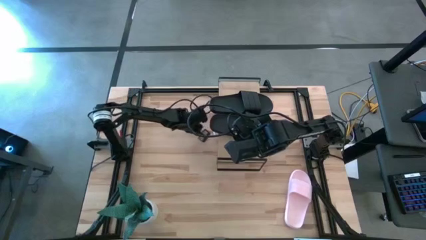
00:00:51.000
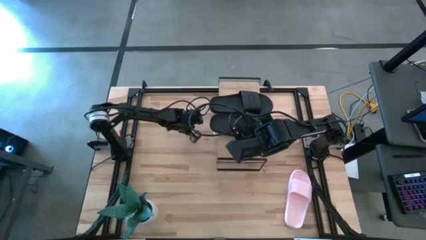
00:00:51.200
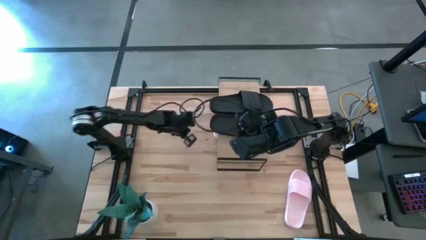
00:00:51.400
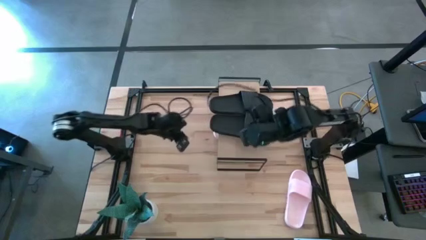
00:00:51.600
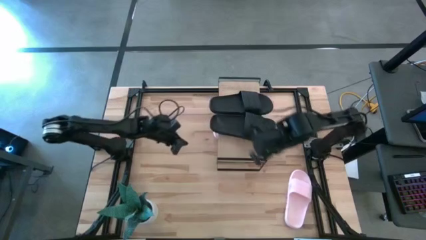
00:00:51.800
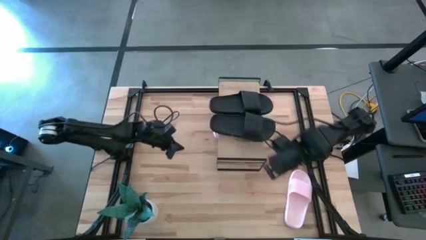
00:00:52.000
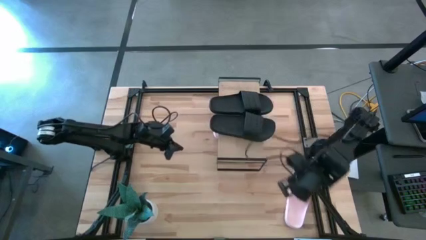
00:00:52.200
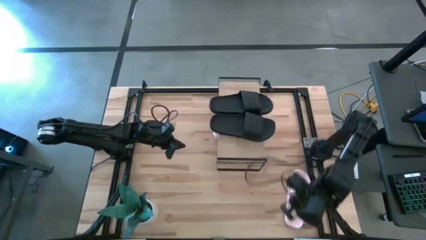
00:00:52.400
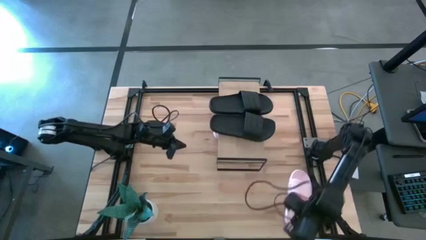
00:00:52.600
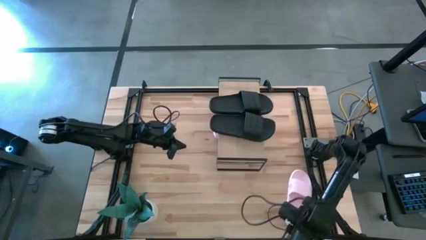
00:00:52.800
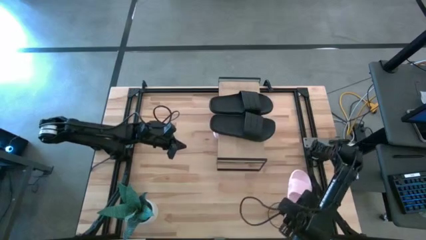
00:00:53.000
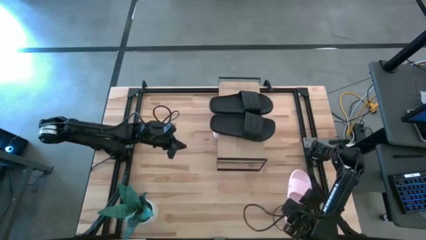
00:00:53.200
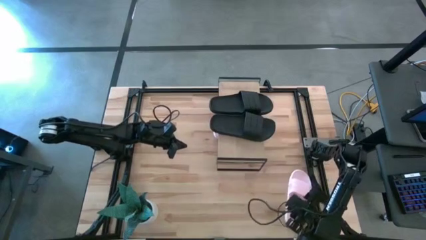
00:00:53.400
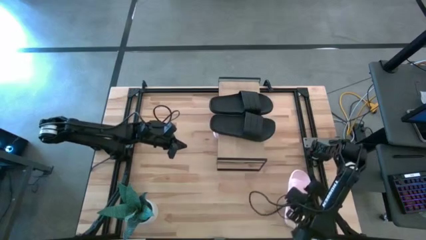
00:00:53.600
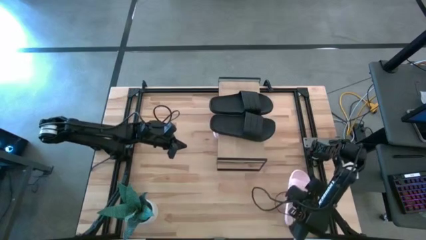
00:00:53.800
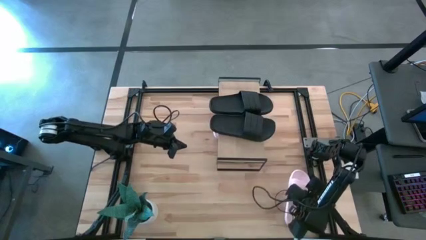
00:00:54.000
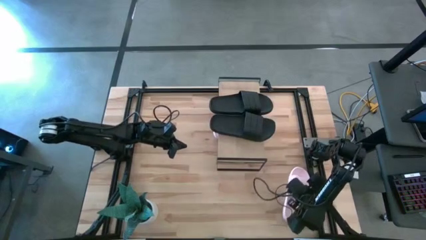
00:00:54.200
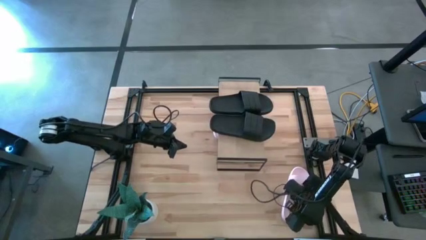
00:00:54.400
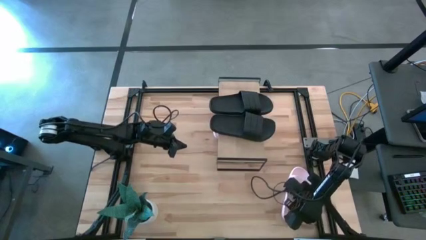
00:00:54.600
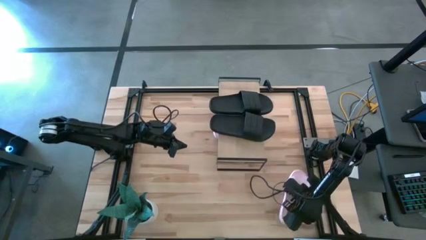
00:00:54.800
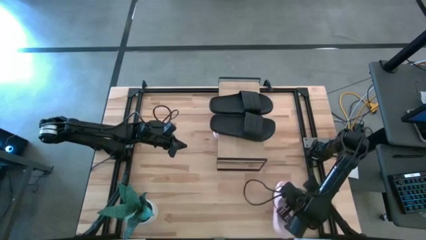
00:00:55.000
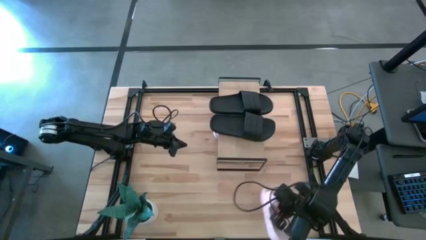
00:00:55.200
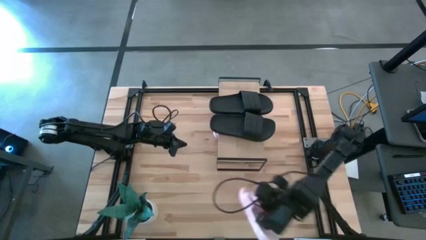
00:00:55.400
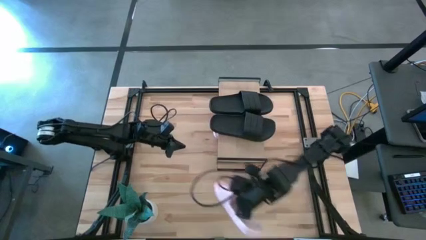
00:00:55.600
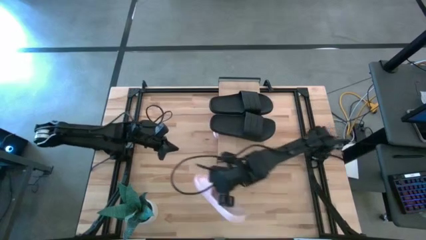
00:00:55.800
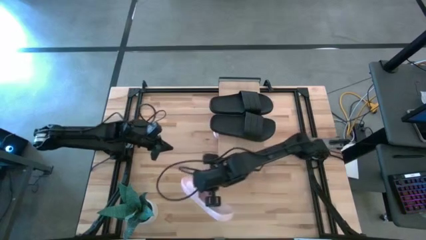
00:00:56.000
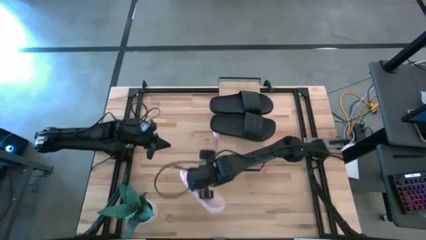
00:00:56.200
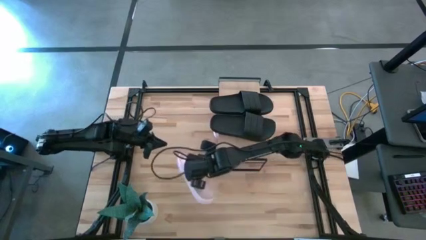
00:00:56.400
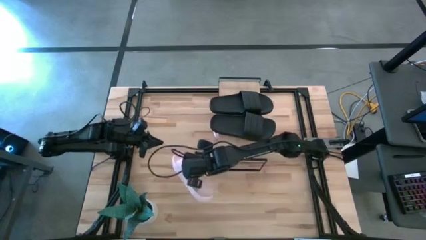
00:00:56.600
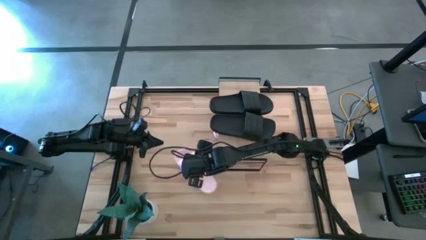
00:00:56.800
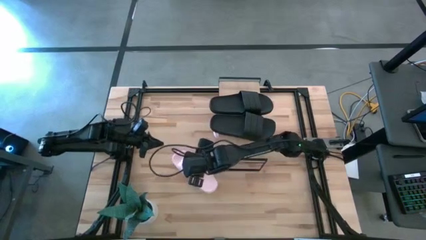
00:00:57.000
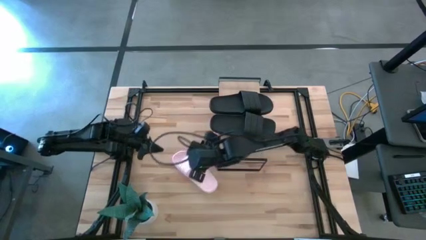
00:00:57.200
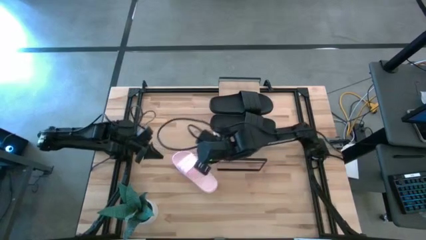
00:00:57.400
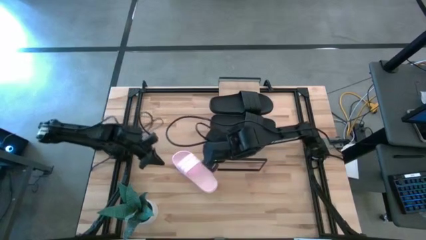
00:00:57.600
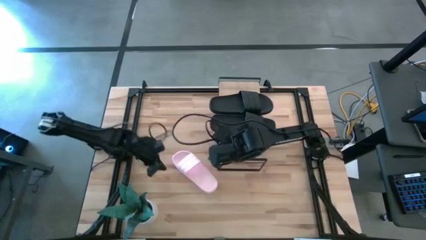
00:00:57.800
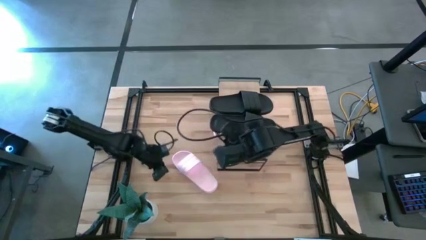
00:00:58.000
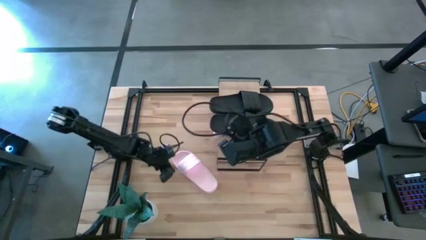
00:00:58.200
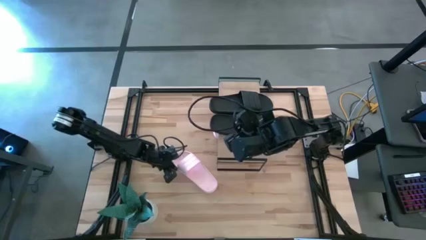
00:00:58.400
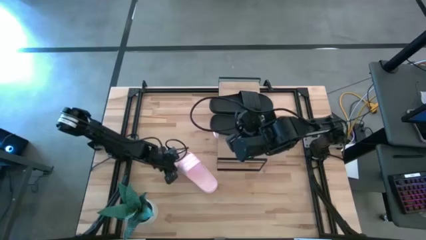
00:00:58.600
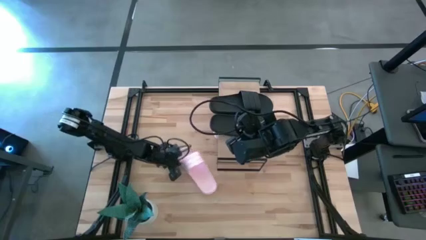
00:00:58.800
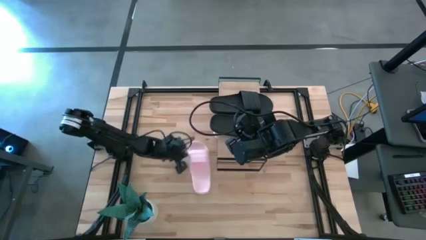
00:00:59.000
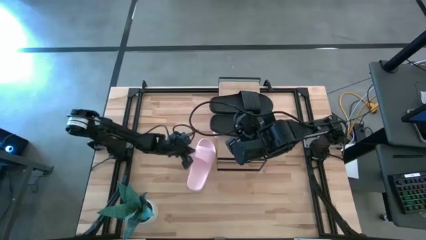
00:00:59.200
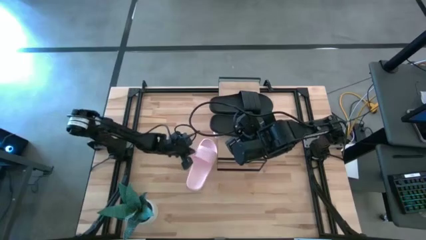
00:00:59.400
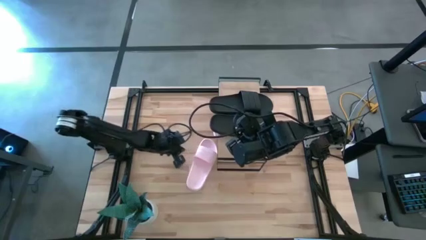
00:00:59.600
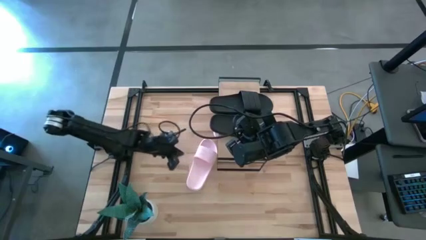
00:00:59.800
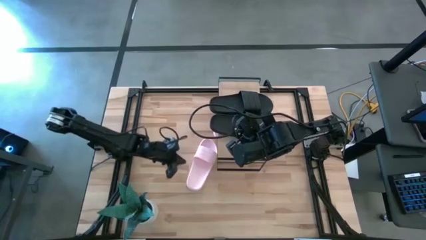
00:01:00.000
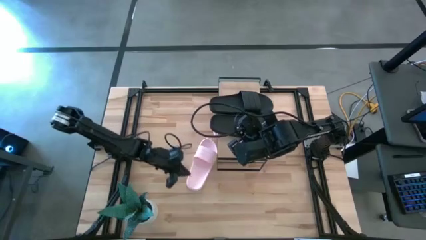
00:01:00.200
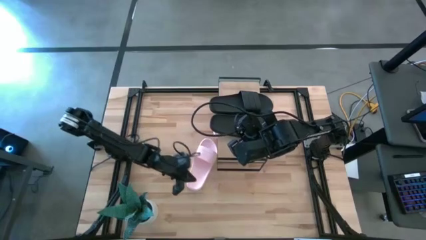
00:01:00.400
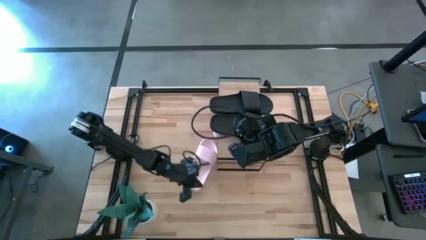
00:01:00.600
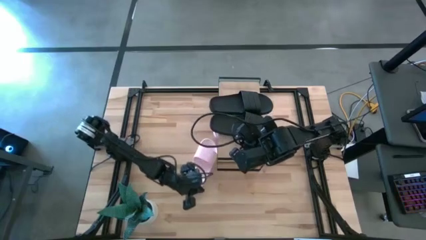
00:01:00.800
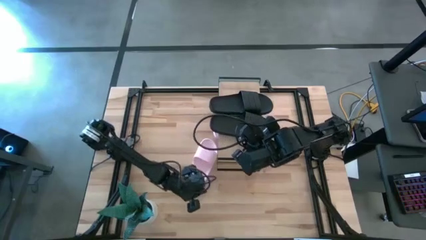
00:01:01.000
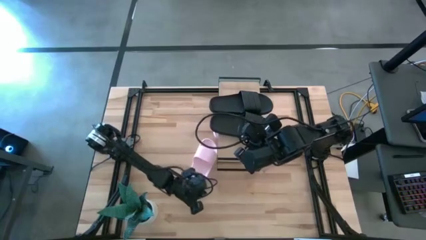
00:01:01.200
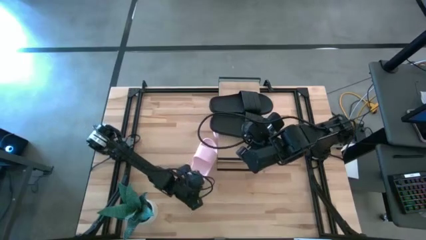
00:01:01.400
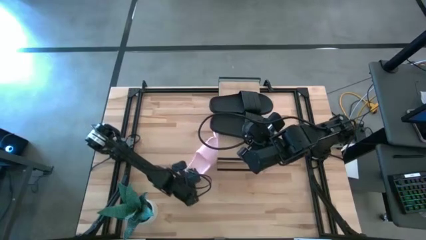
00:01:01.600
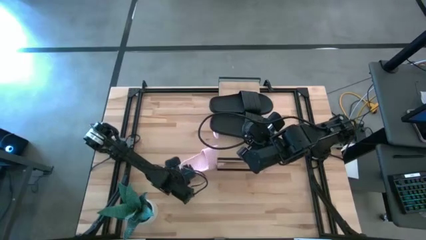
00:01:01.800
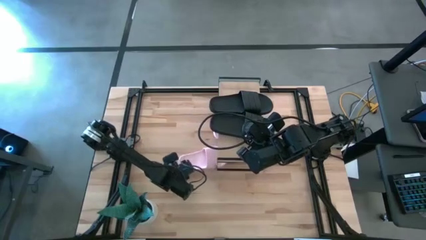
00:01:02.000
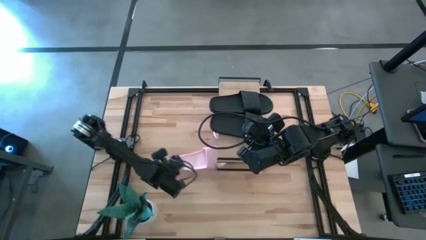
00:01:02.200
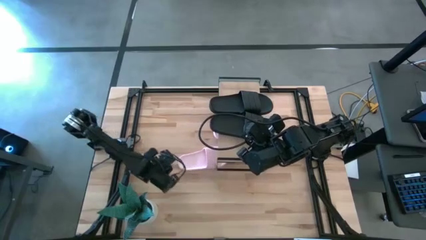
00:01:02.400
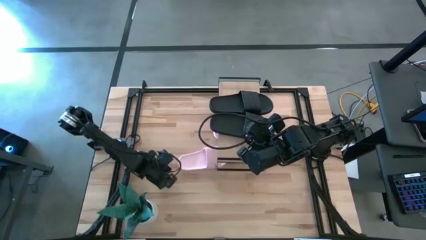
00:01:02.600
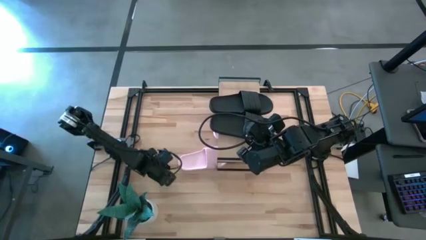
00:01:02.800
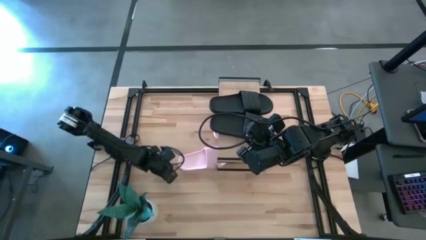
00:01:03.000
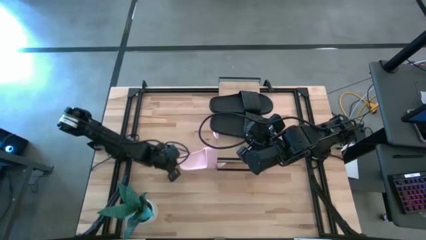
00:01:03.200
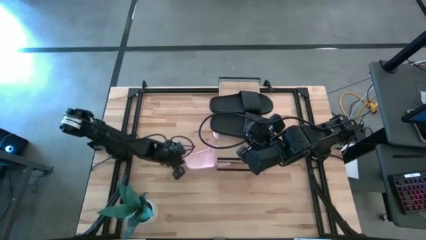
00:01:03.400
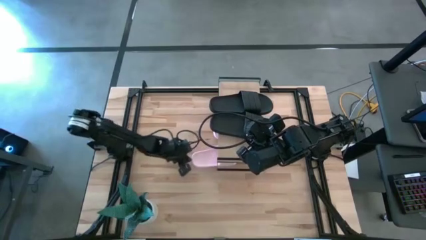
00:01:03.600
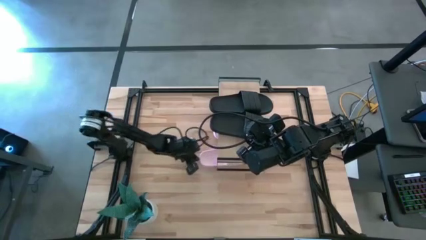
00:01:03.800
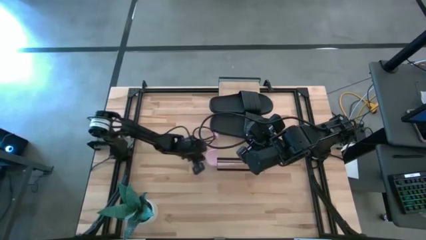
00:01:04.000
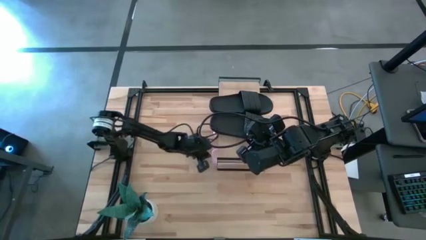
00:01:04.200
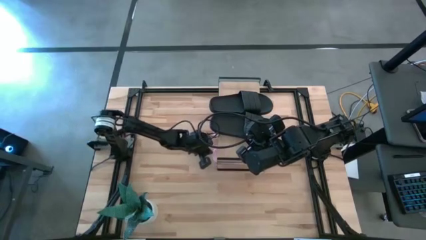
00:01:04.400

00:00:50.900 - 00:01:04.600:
Task: Pick and place slides into the shelf
Put the right pink slide under the shelf

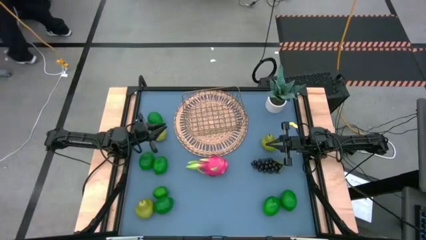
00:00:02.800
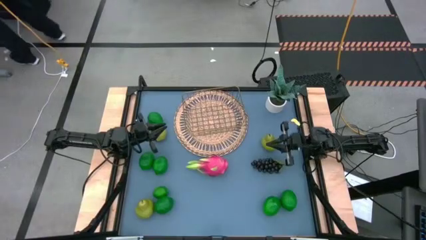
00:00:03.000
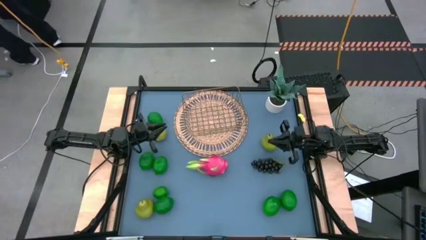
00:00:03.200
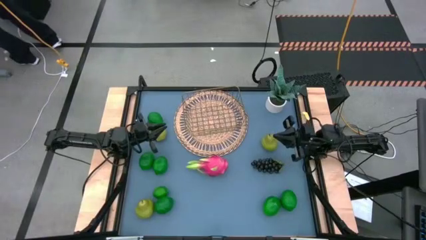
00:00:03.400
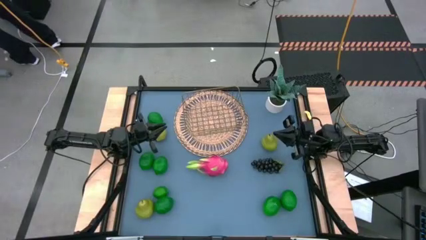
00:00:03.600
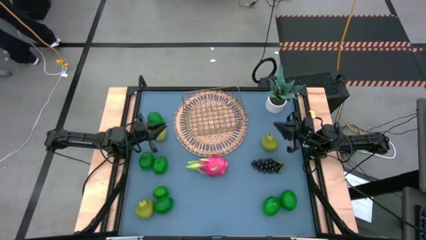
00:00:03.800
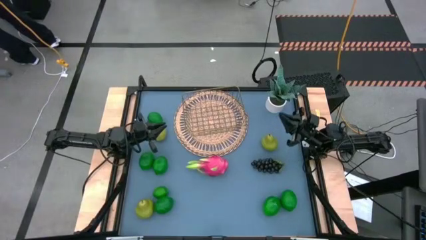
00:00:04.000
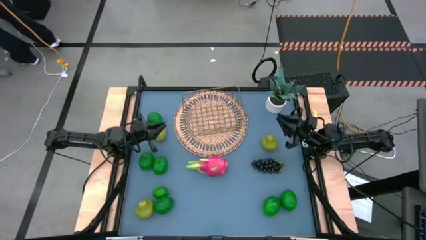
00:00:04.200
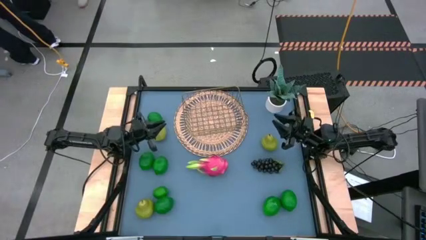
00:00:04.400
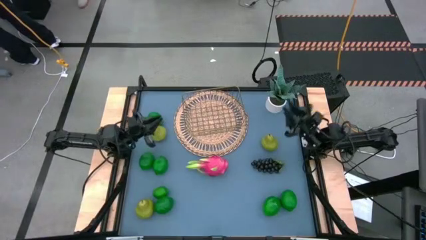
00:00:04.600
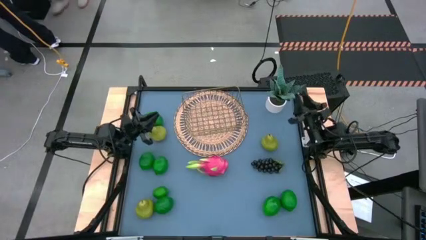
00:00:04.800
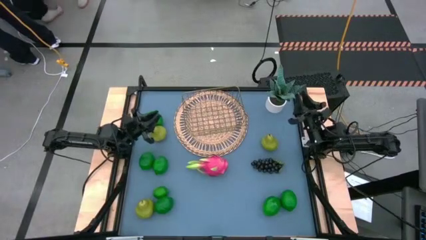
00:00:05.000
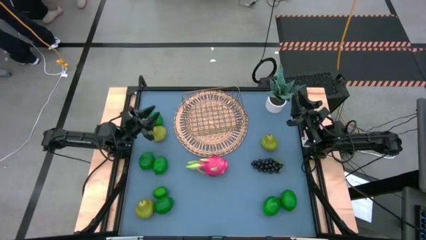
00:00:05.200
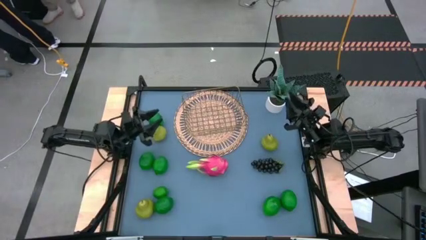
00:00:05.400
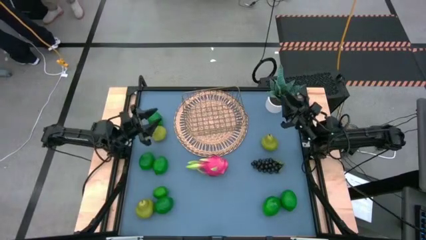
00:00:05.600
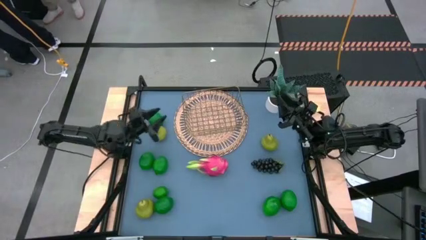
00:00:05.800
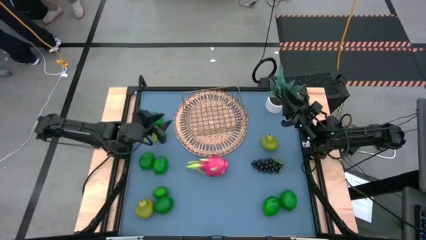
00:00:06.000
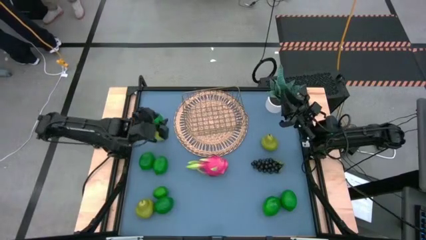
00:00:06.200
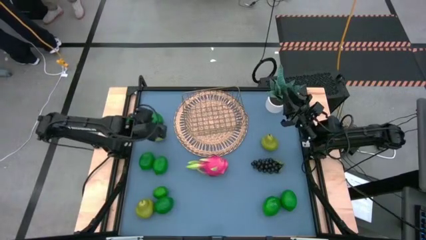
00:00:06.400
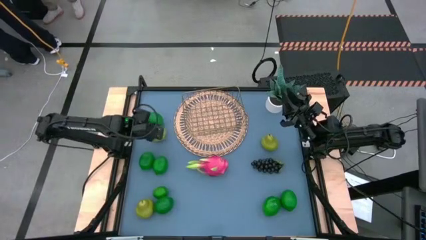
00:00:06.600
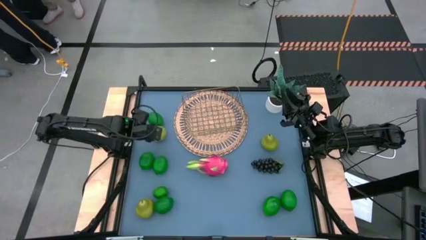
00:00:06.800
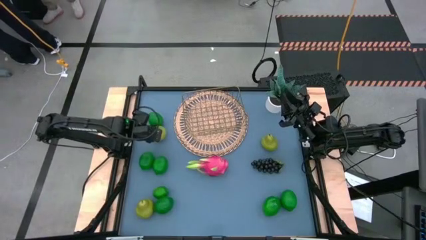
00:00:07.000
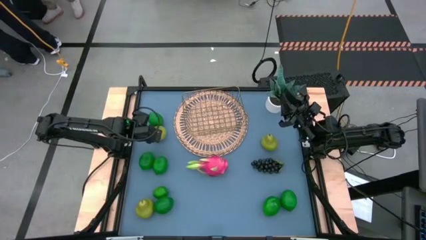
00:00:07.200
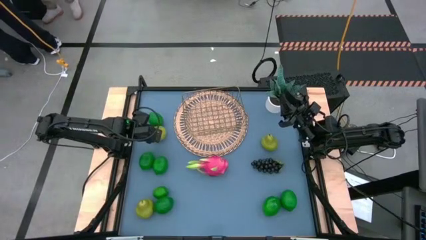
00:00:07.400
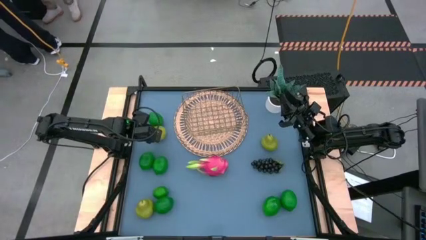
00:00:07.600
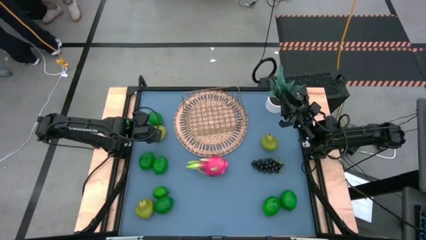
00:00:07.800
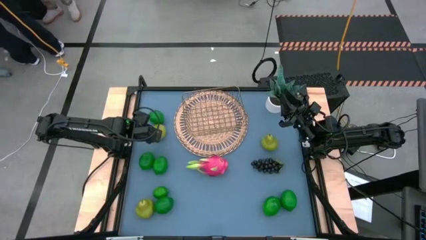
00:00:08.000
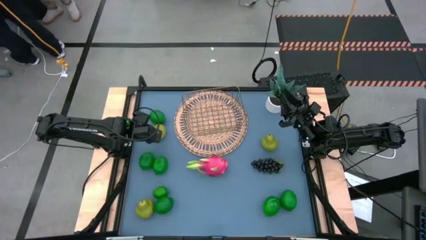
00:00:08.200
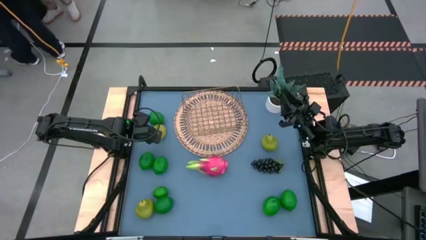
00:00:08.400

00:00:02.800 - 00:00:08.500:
Task: Build produce basket
Put the green pear into the gold wire basket
